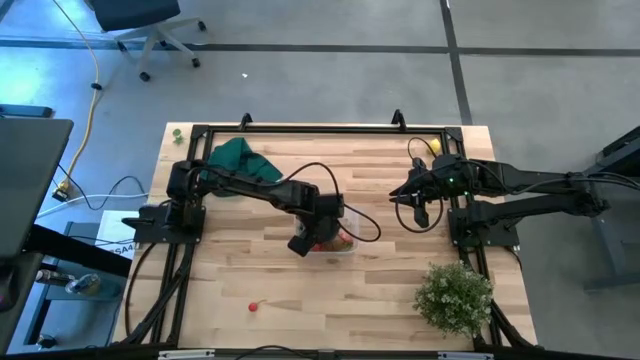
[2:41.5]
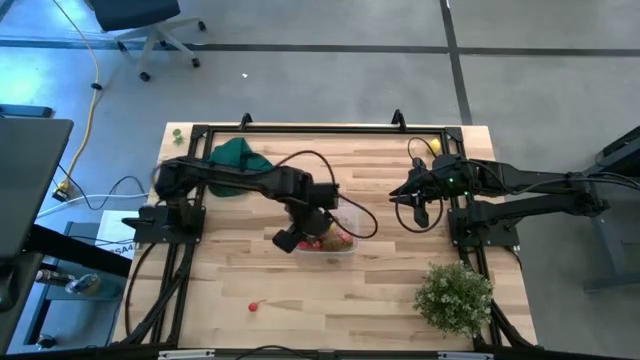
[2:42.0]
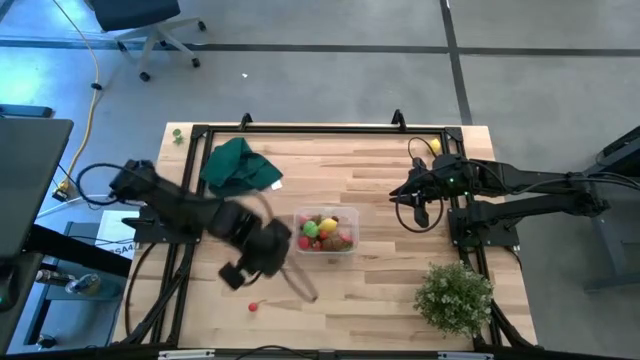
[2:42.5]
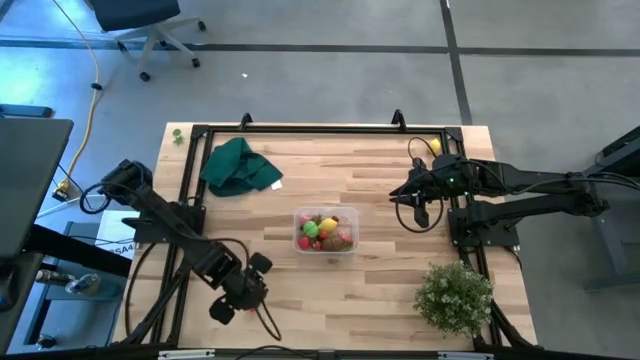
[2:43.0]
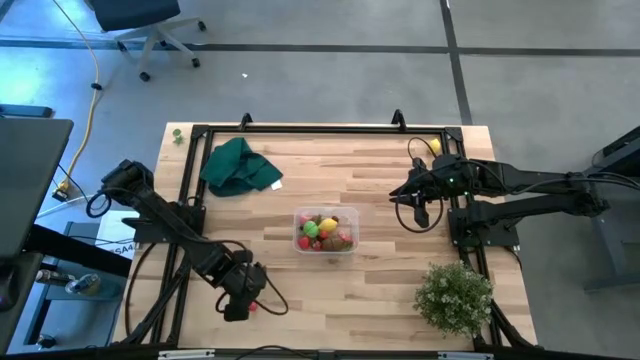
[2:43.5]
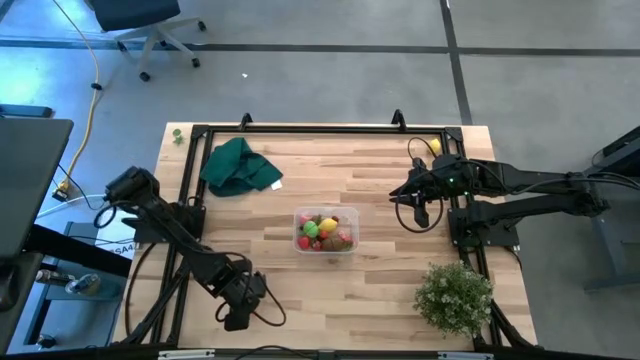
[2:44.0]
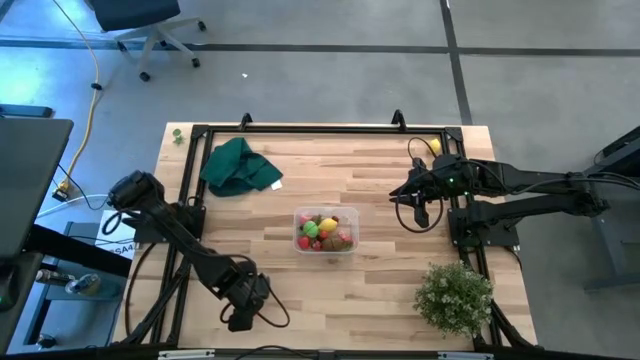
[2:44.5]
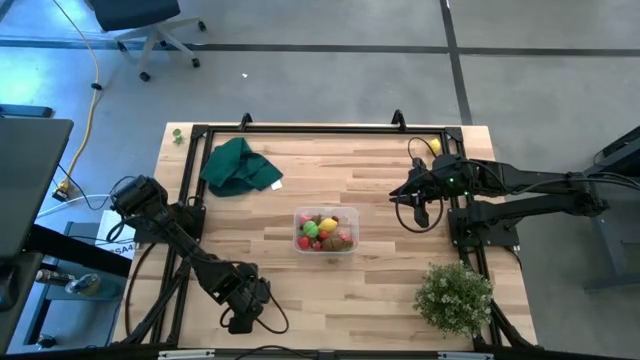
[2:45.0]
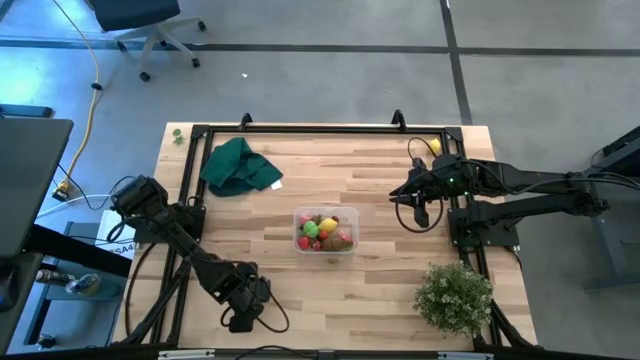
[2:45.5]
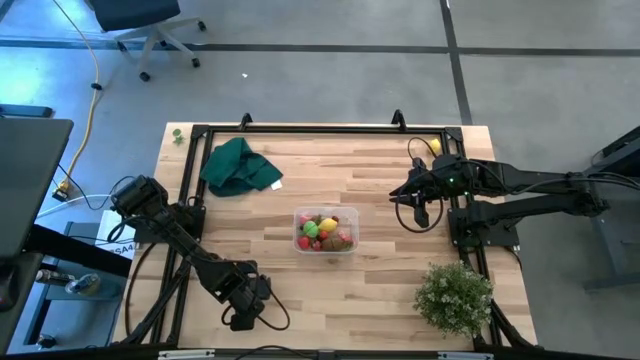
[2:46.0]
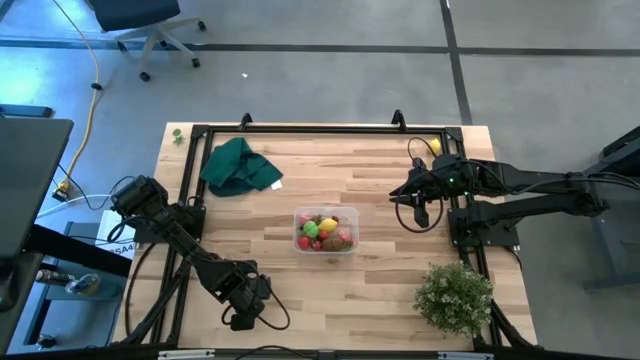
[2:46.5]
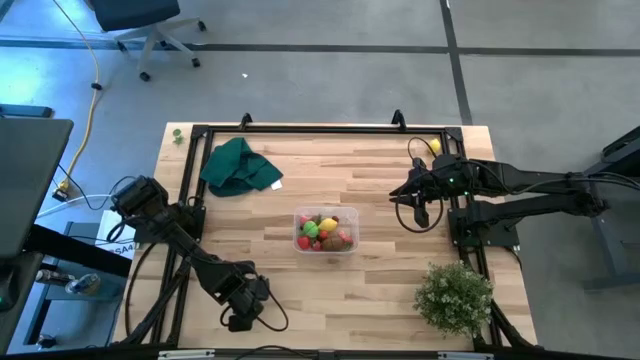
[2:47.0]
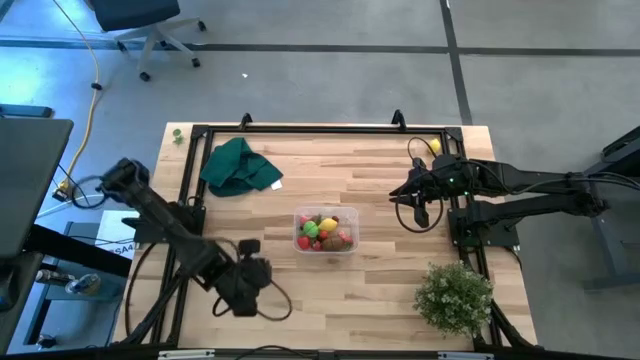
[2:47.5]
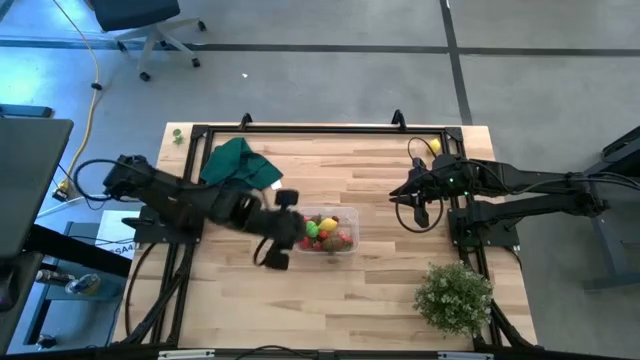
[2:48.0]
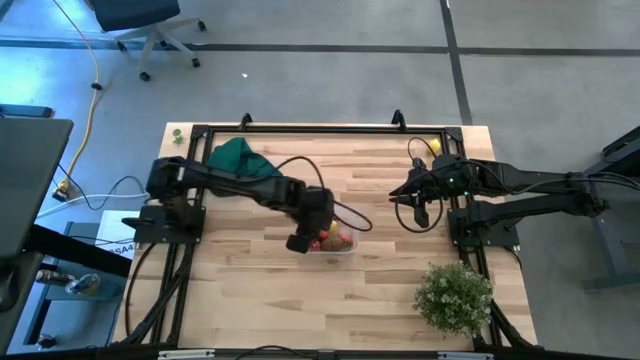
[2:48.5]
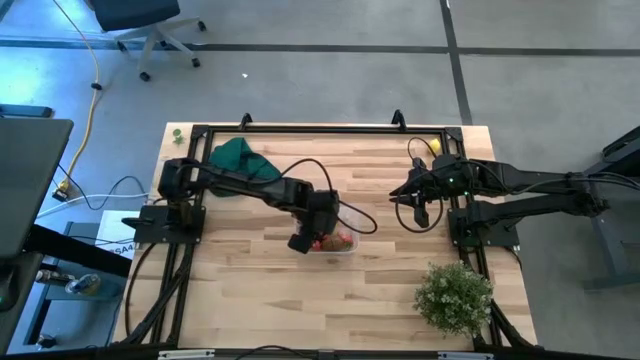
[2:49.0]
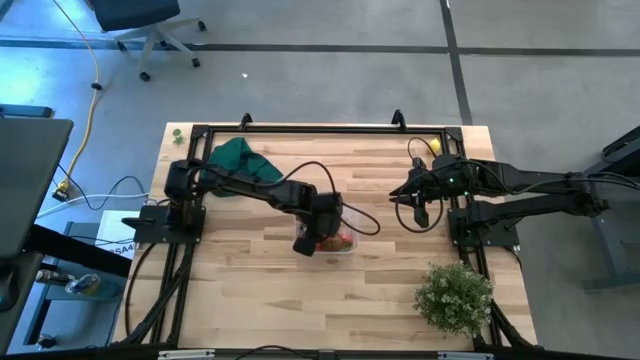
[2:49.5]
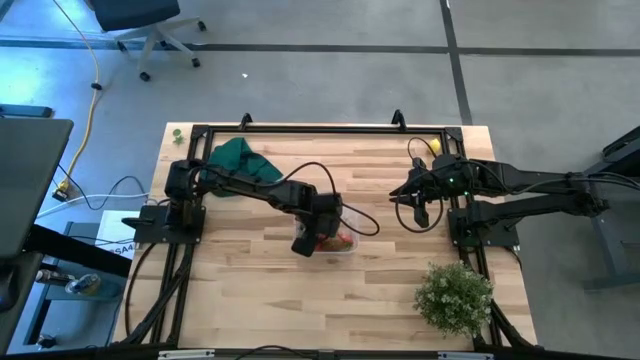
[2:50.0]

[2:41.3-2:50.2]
Task: Pick and placing Produce into tupperware
Put the red cherry into the transparent bin

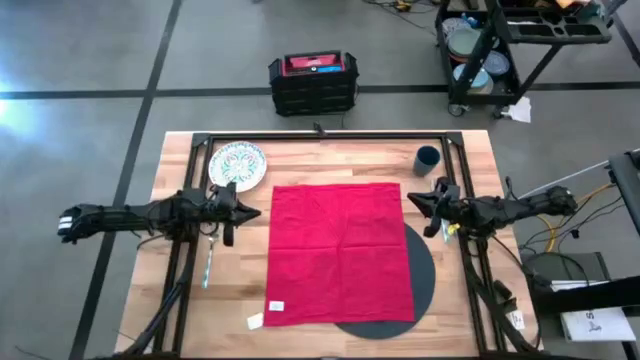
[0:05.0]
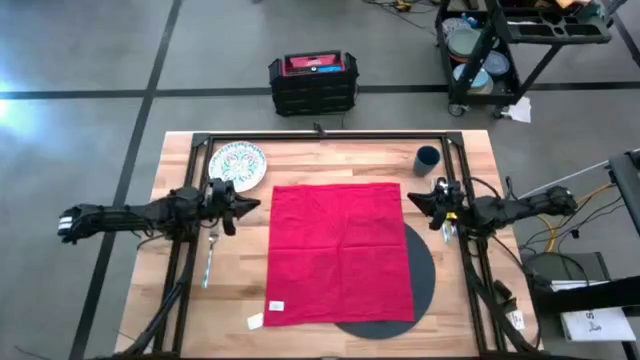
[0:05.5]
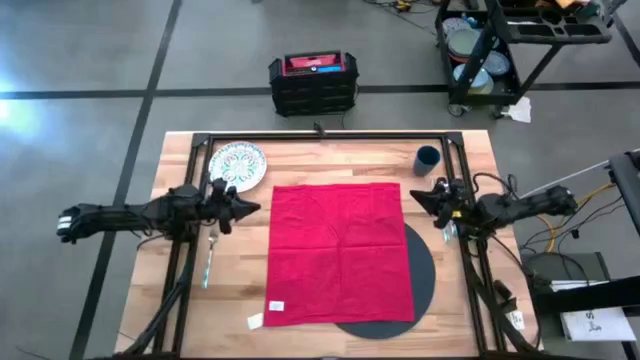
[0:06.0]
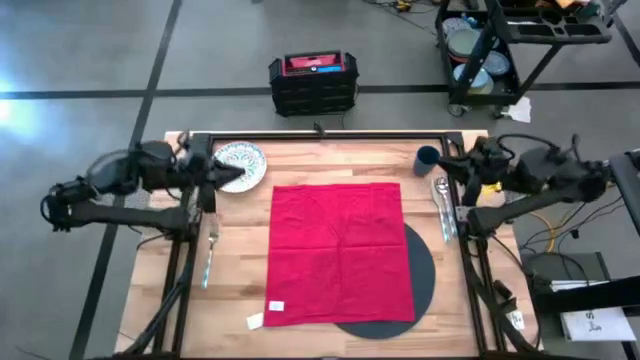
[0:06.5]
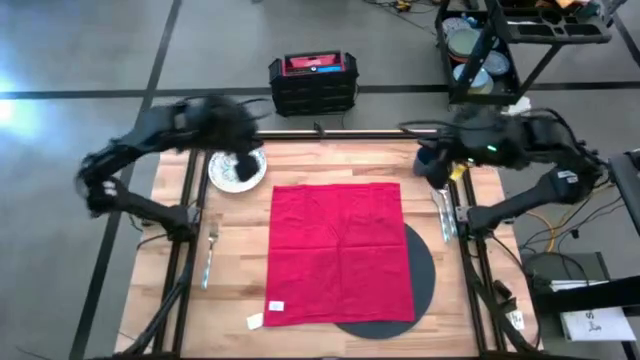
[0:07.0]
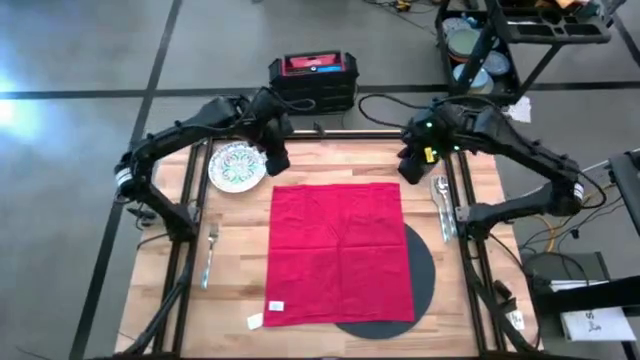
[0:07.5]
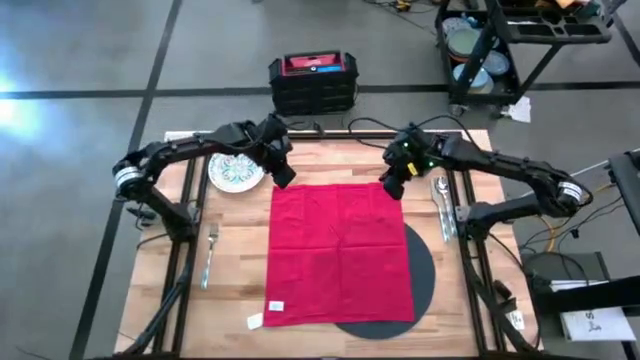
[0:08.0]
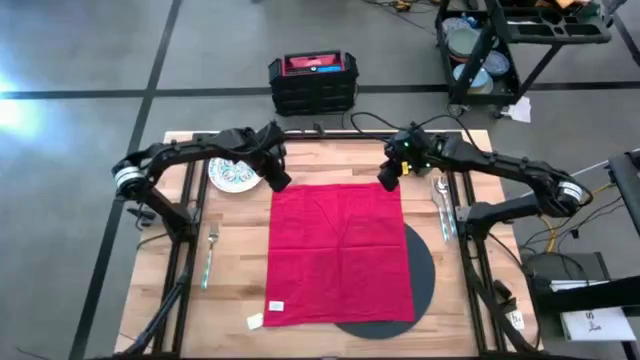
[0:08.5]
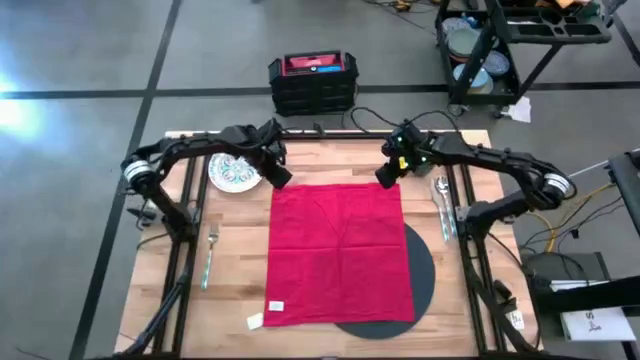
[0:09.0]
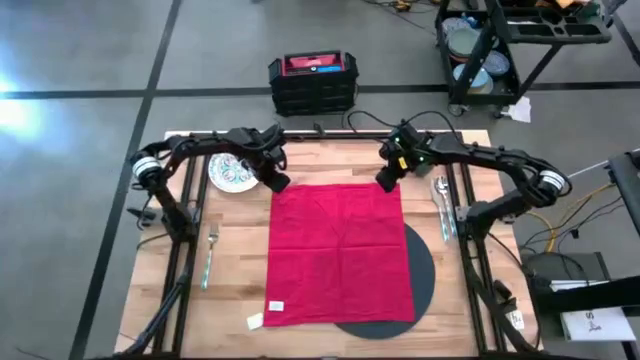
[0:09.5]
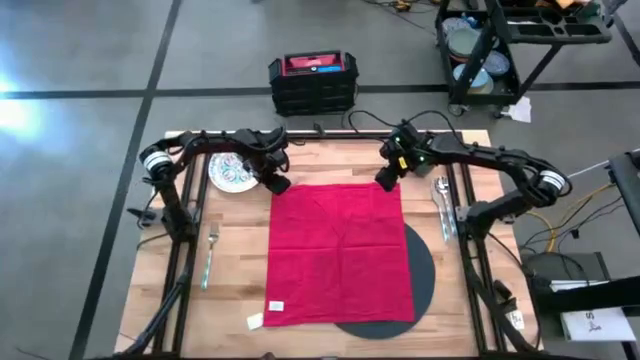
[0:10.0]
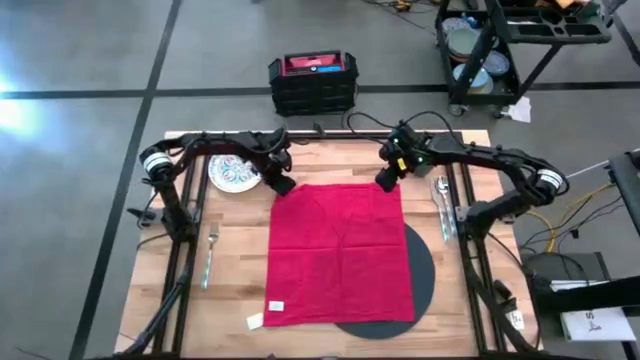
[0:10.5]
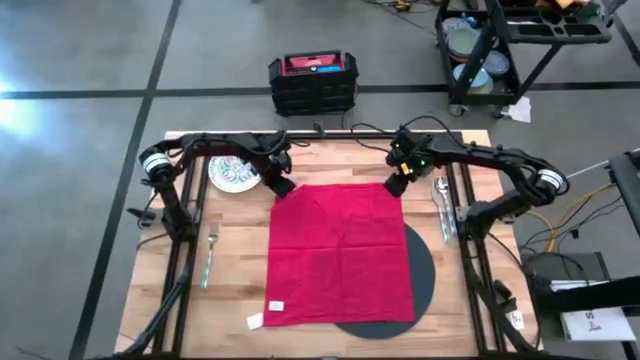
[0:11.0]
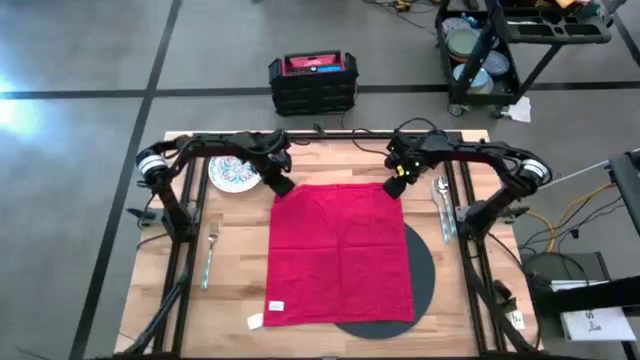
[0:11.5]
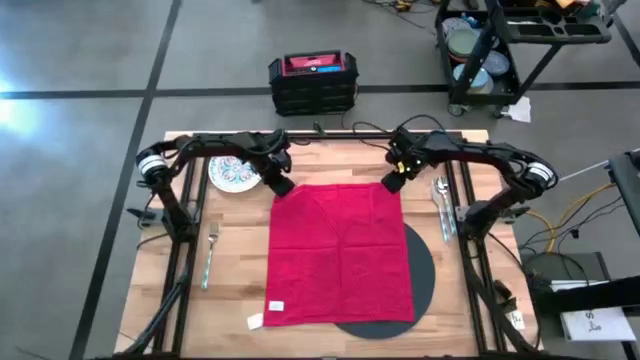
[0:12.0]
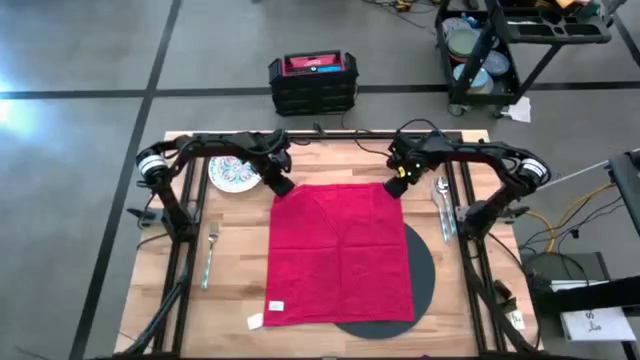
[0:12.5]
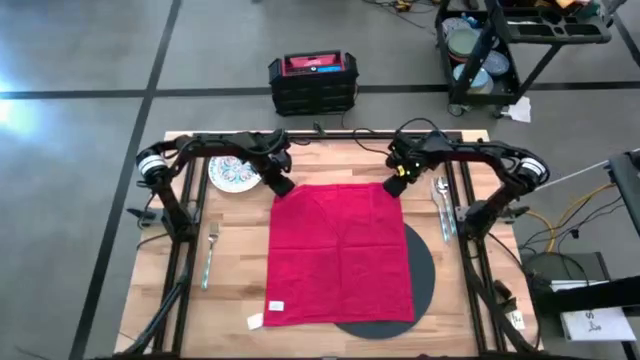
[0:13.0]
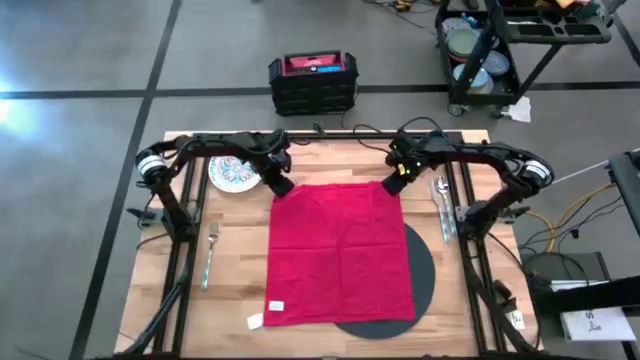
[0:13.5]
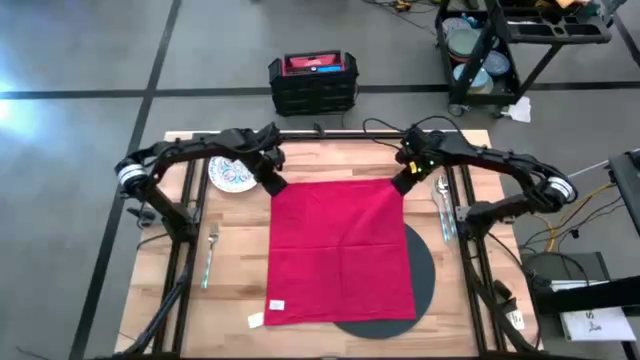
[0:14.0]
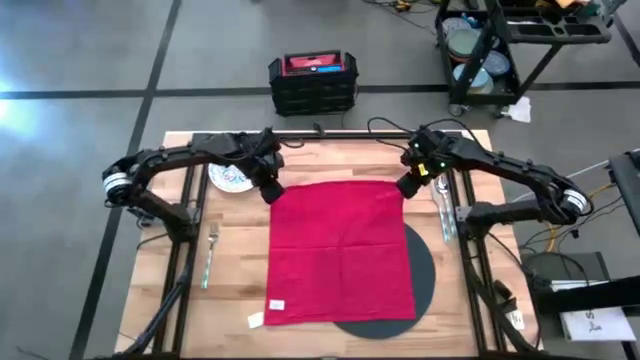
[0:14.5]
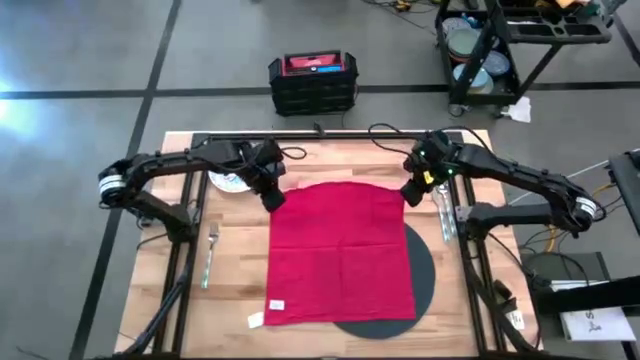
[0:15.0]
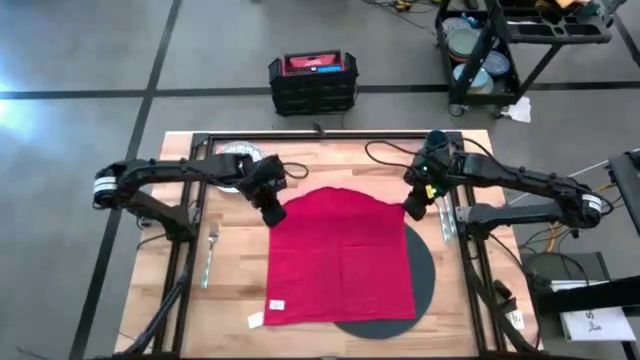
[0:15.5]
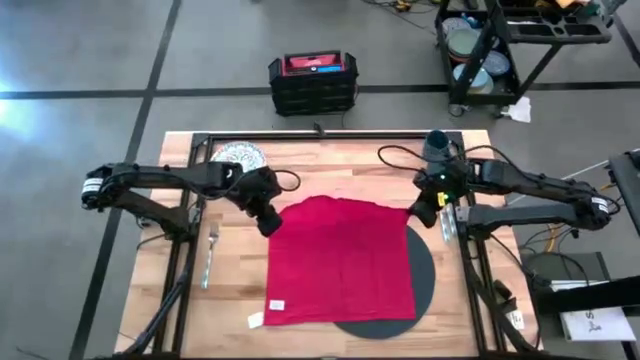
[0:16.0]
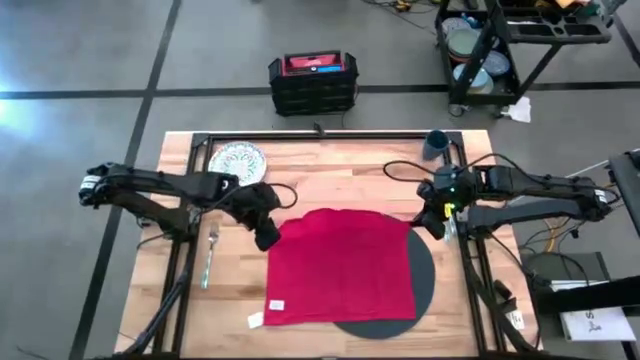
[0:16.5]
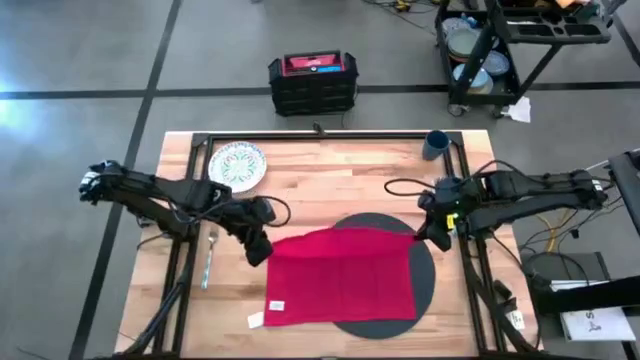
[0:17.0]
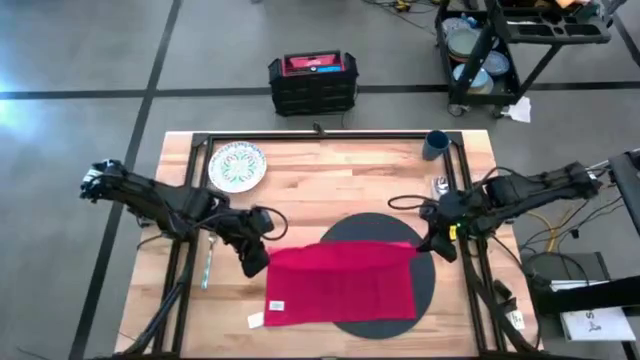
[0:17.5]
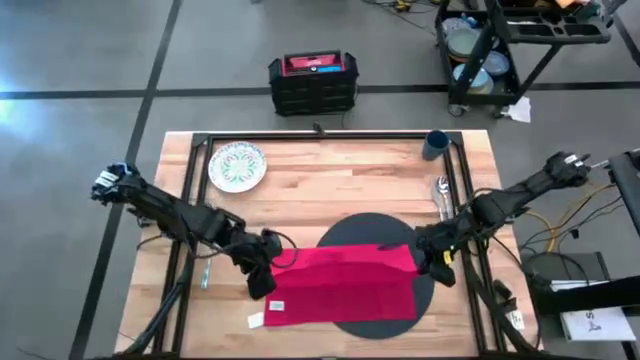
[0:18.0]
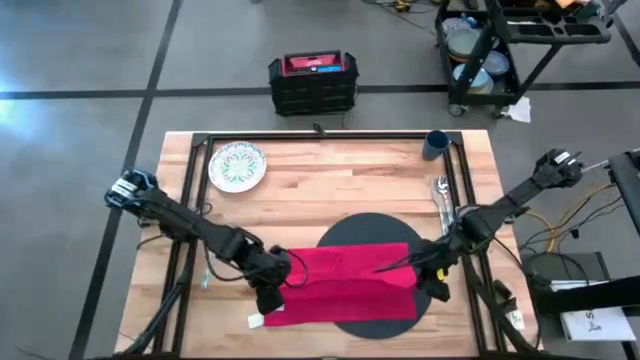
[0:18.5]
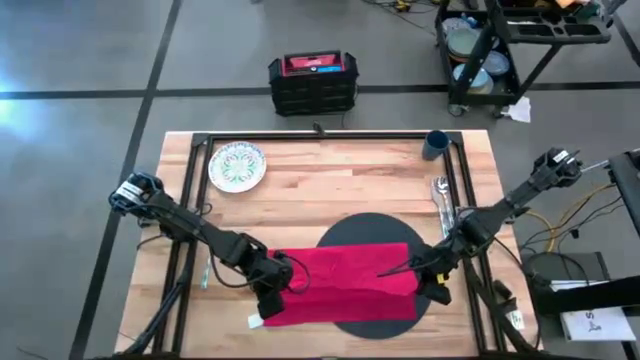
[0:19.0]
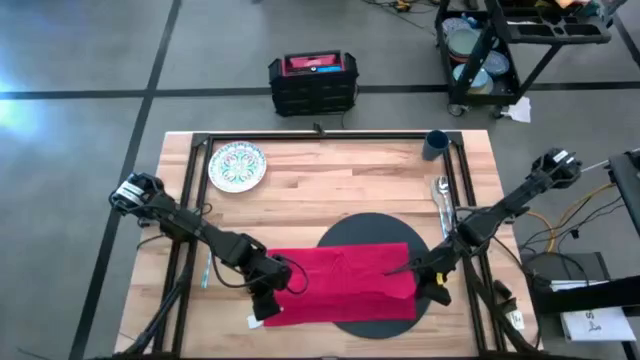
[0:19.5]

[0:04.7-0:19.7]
Task: Set table place
Fold the red napkin on the table
